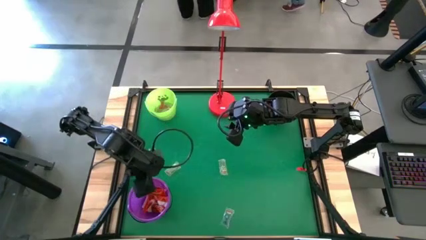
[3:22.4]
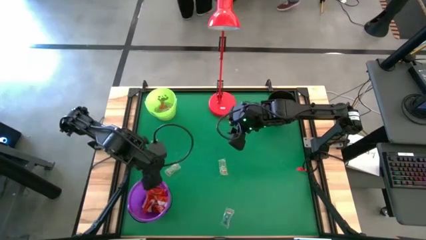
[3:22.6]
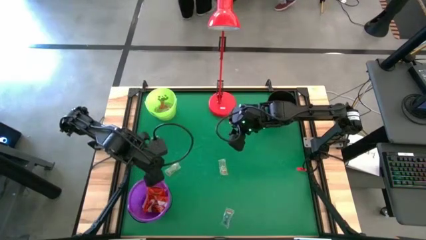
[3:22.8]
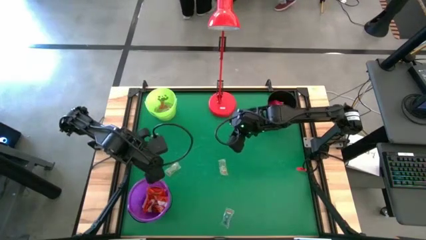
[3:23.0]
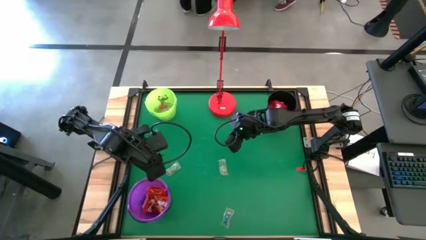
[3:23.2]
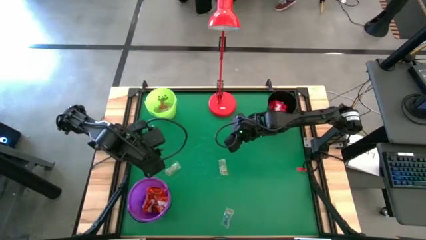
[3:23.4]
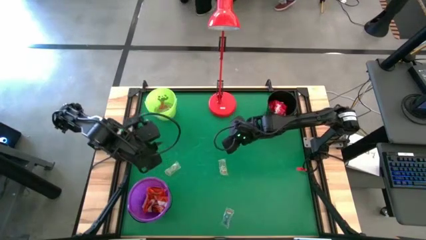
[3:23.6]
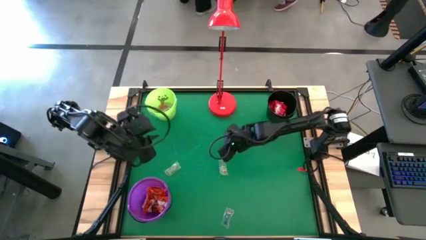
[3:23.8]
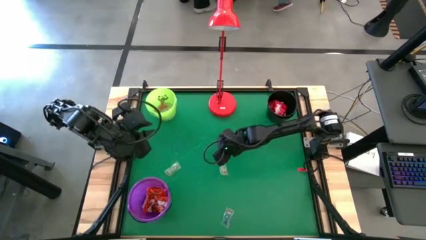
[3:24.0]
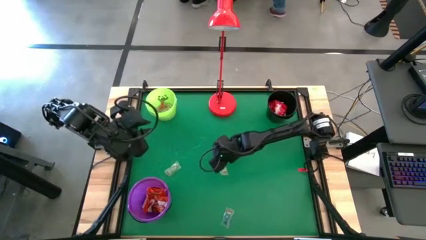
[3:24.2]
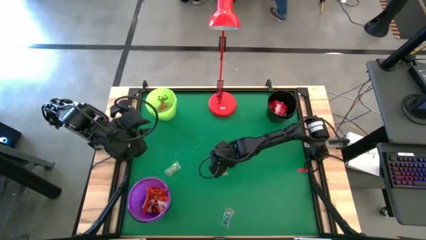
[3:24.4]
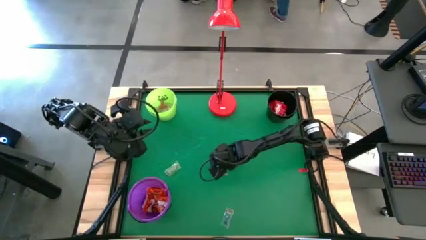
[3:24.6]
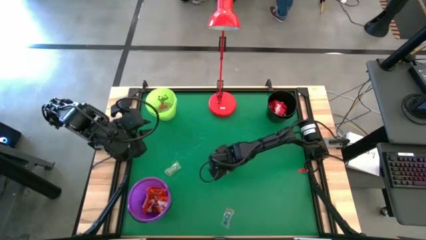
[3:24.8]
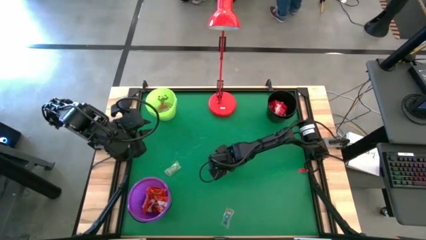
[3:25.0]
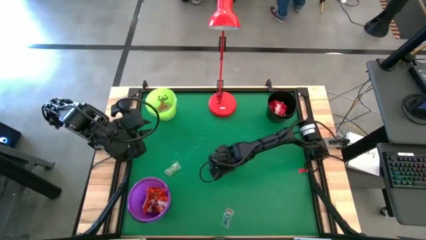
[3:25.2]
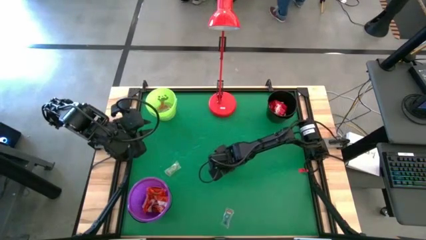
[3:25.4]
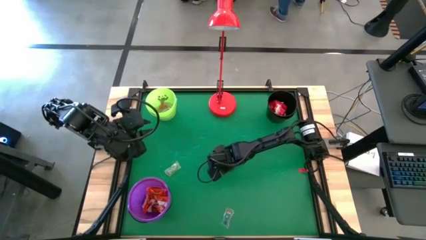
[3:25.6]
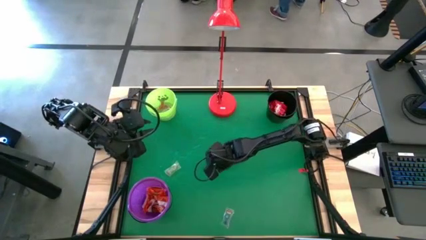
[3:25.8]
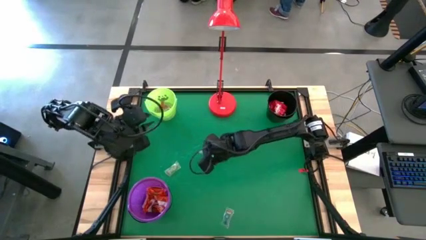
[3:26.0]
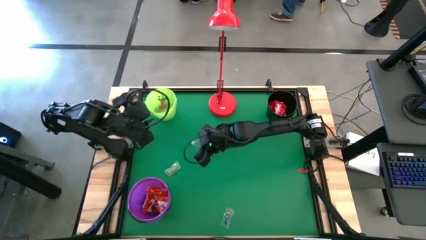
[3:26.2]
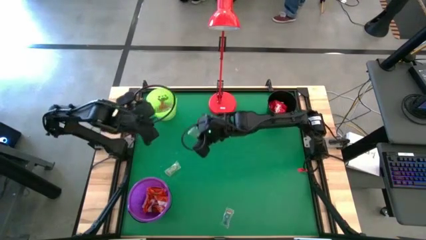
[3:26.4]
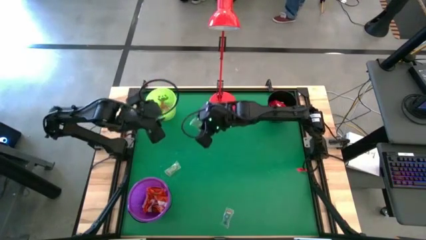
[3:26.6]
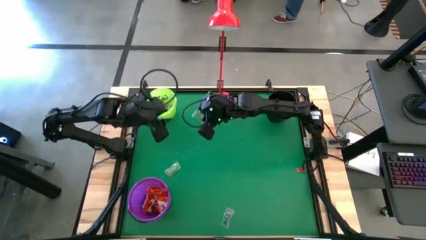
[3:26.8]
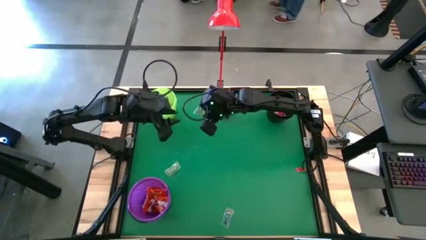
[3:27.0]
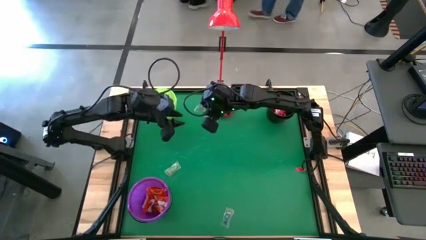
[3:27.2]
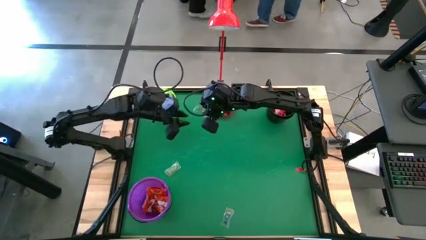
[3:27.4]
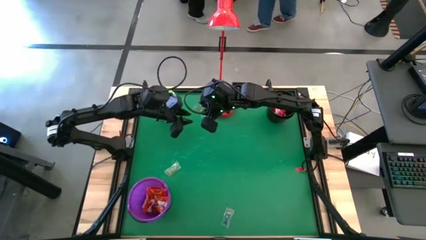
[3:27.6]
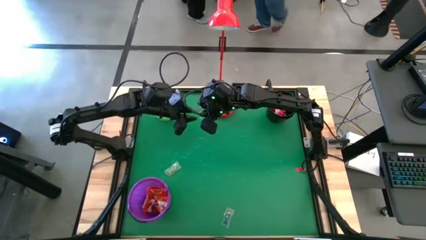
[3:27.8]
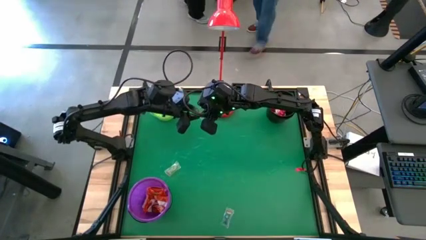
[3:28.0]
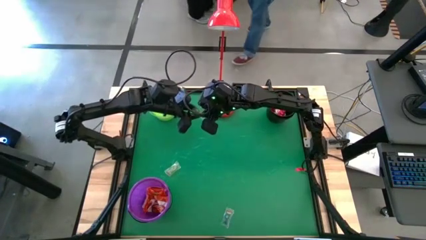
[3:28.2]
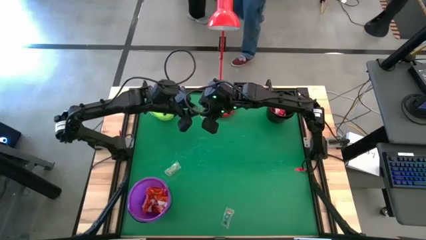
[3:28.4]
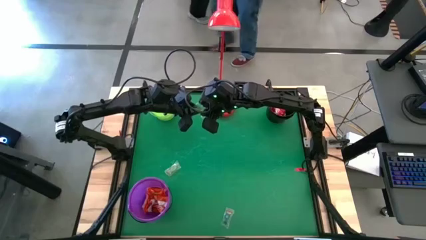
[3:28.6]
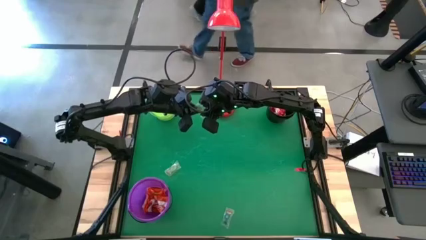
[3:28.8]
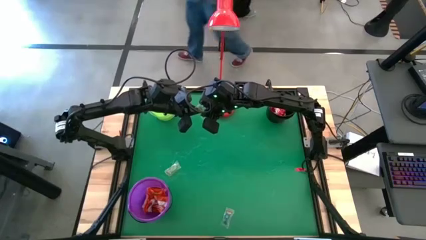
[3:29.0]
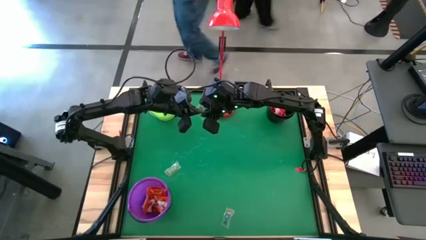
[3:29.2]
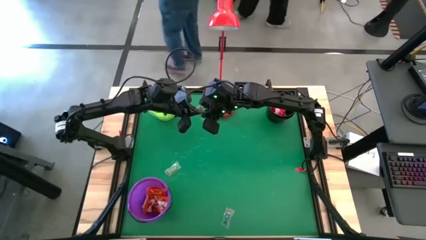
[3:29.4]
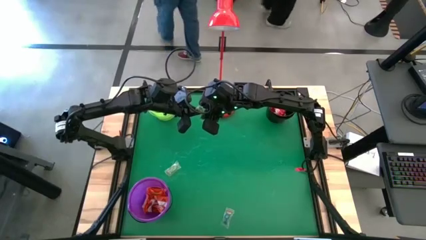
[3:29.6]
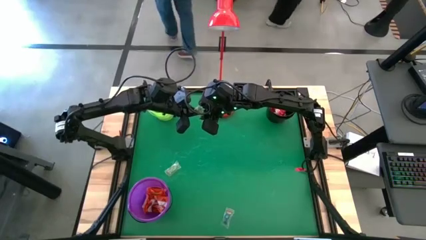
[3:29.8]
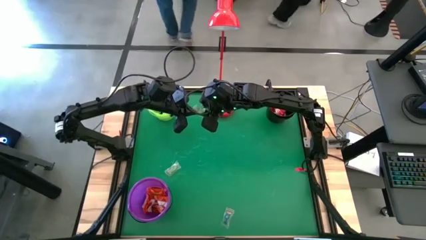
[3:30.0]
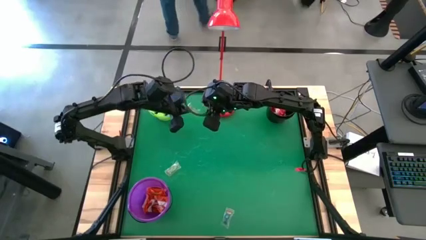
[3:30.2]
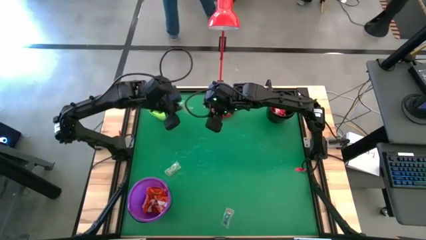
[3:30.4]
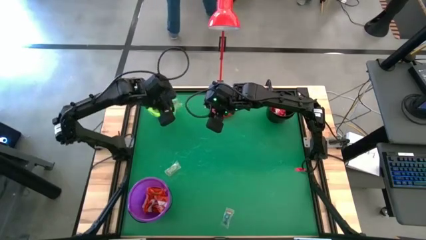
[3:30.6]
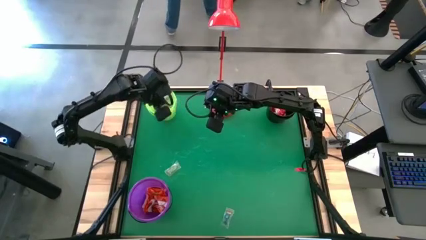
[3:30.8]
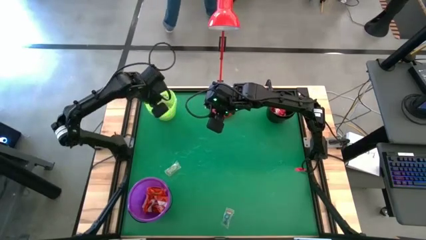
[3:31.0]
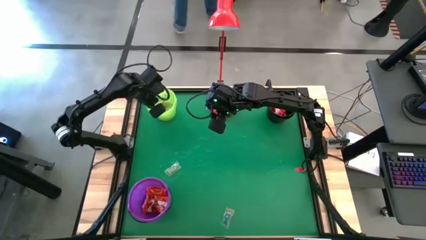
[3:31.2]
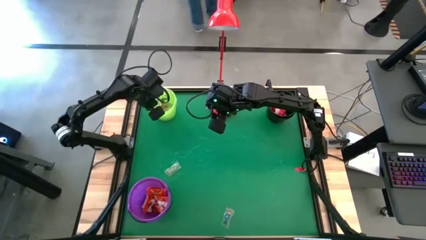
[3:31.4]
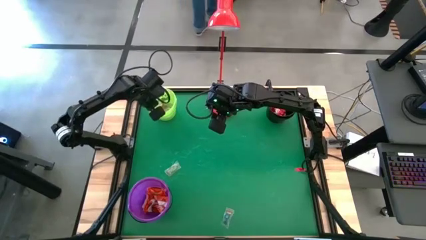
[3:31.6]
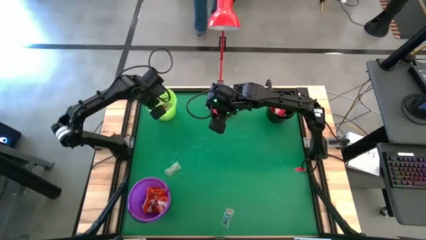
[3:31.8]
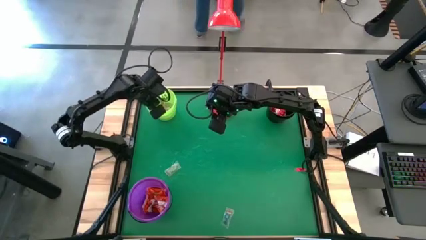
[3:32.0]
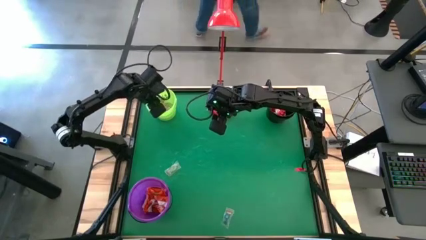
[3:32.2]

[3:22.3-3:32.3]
Task: Sort candy
Put the transparent candy into the green bucket

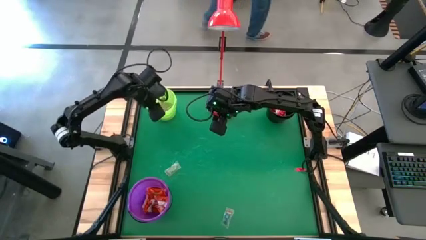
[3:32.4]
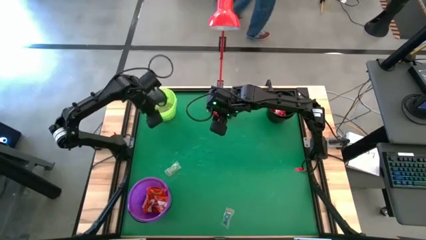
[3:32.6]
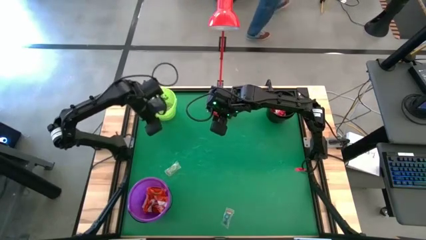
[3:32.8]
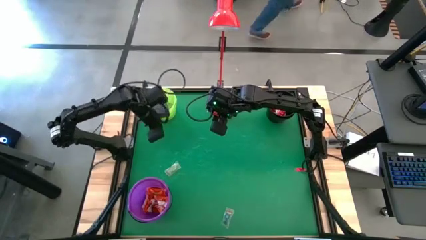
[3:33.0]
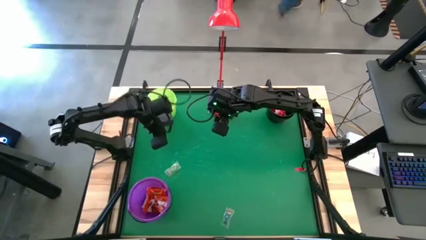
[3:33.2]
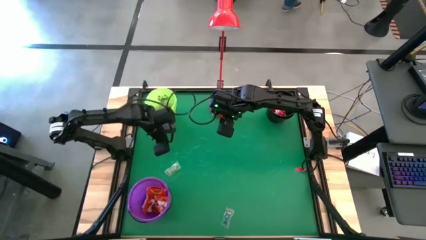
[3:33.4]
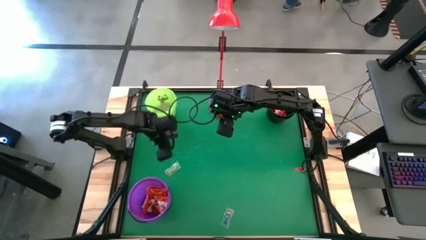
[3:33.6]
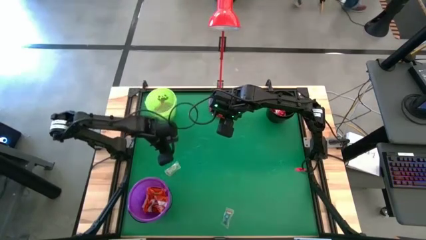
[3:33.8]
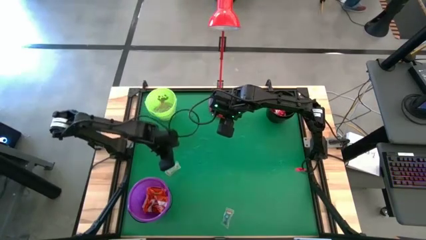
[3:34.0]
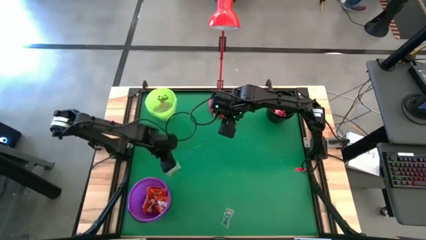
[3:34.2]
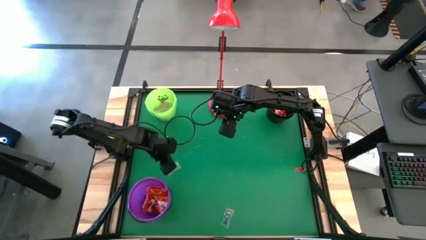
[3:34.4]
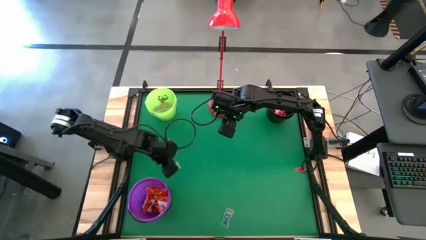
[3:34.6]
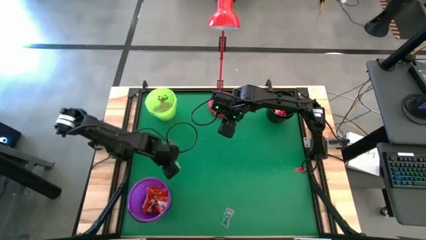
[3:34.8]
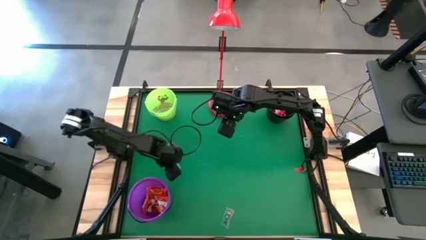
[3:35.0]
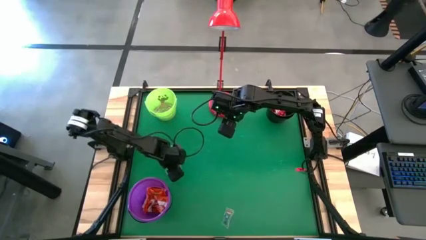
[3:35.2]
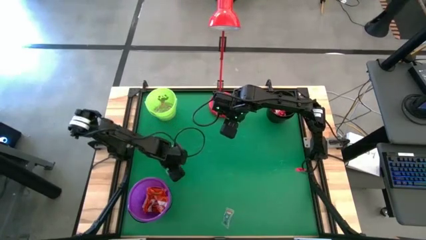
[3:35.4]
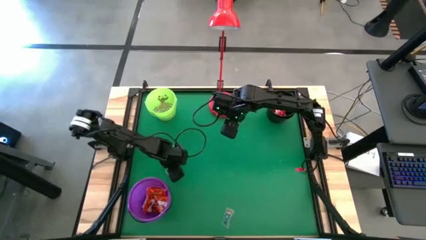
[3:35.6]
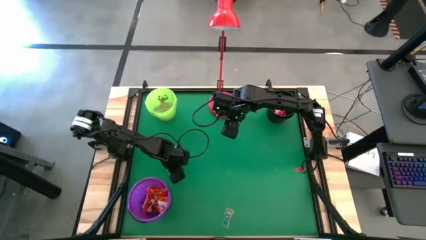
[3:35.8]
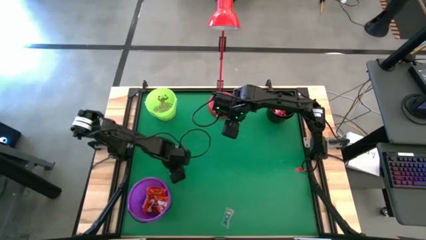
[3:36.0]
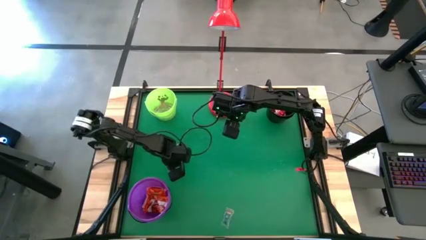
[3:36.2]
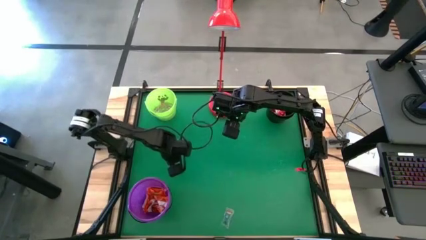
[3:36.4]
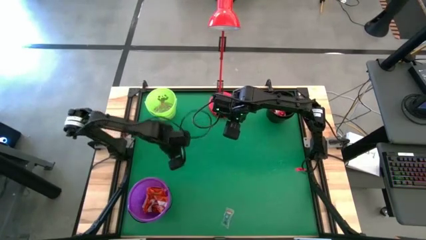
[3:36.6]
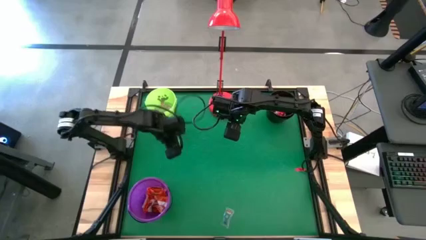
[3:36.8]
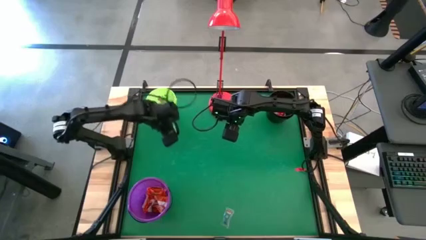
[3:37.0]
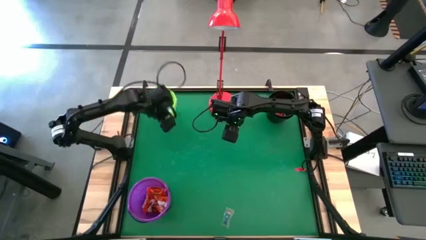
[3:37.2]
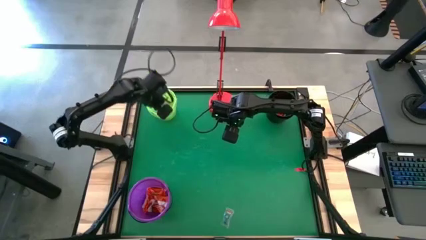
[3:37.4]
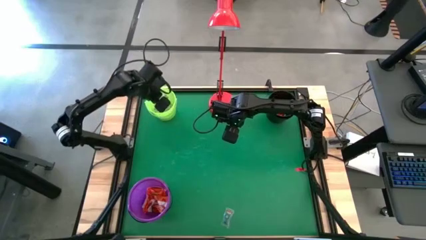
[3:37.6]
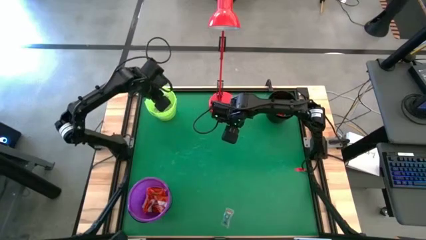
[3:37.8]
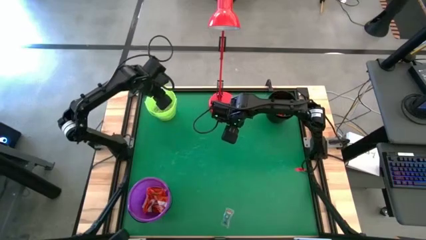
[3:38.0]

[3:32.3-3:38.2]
Put the transparent candy into the green bucket
